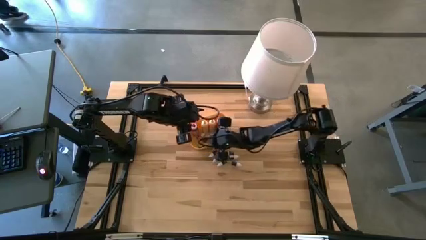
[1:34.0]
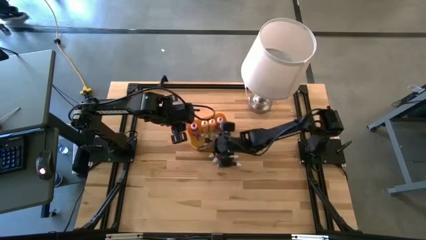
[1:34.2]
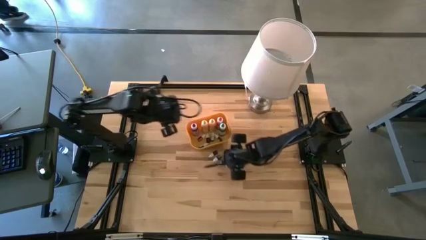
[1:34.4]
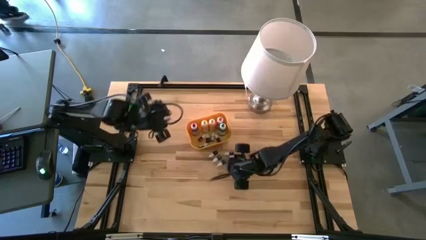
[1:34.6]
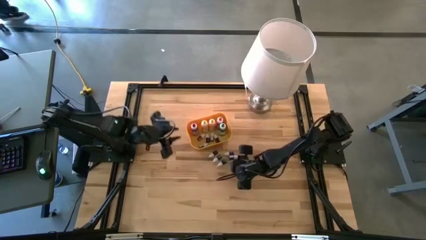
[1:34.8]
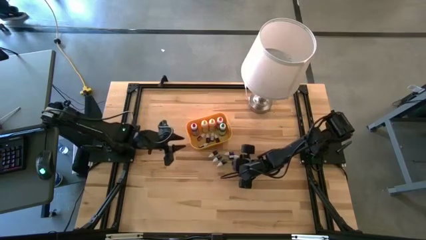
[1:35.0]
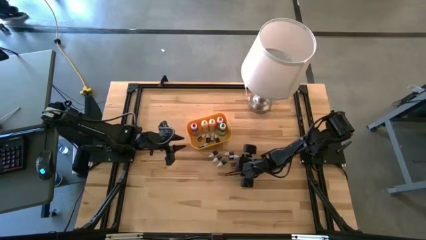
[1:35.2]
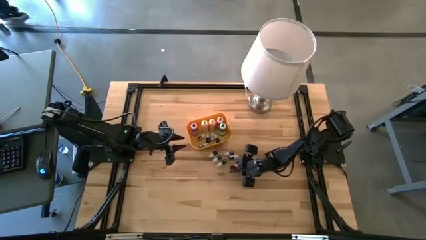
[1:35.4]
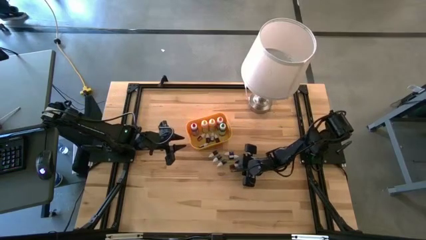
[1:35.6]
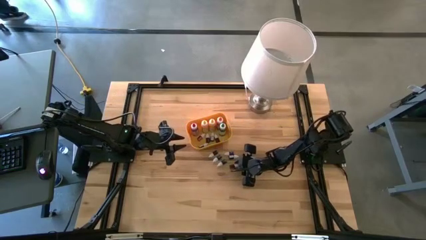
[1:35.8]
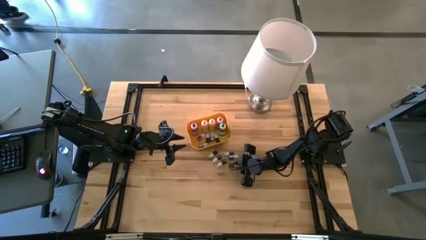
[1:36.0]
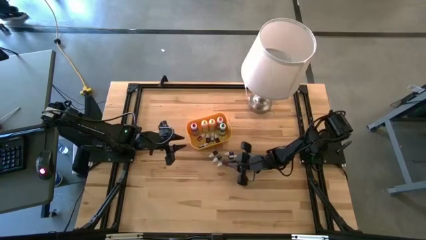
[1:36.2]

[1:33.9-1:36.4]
Task: Pick & Place food coloring
Put the small red food coloring bottle into the yellow bin

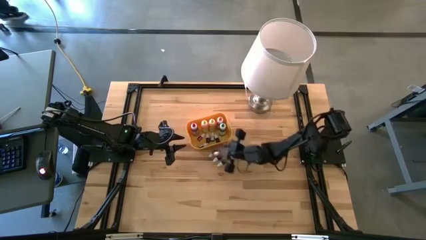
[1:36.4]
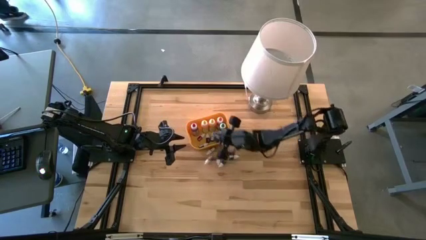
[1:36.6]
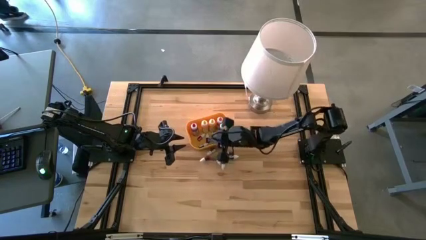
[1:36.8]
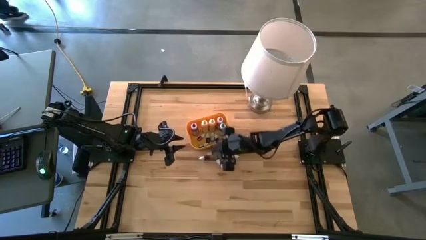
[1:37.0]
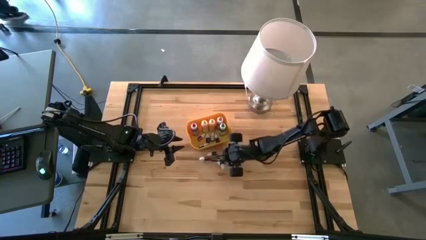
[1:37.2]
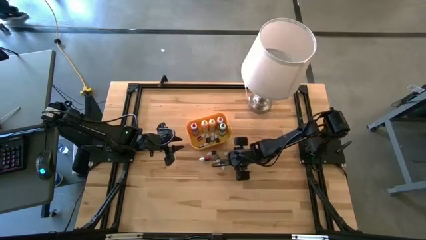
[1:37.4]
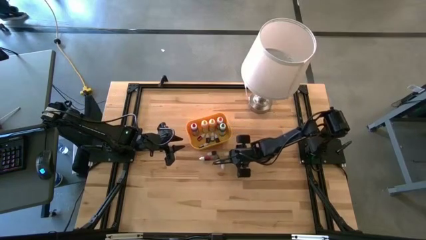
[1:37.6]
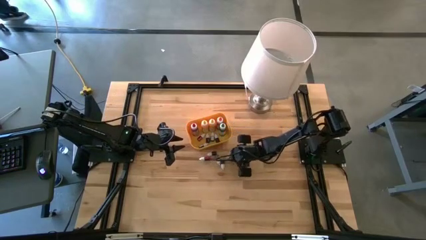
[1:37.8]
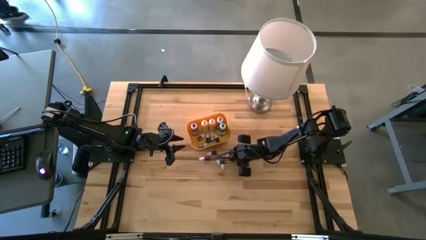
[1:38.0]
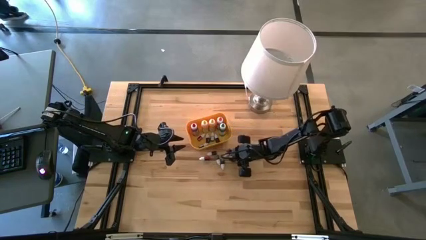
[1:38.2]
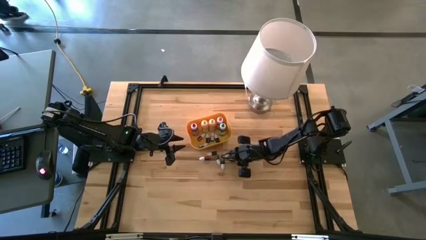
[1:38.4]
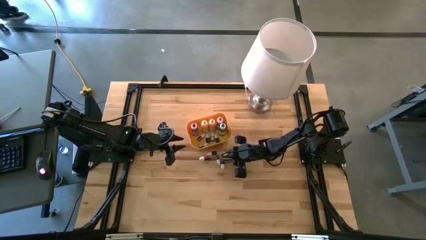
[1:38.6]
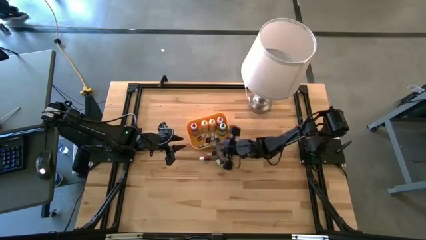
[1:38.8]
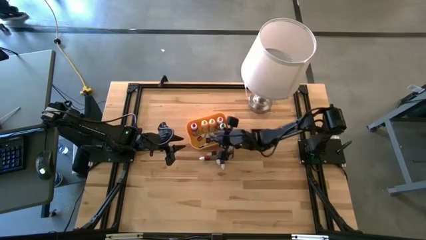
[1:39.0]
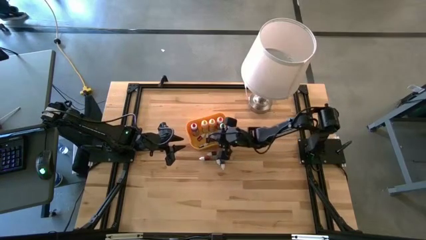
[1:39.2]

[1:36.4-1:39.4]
Put the small black food coloring bottle into the yellow bin

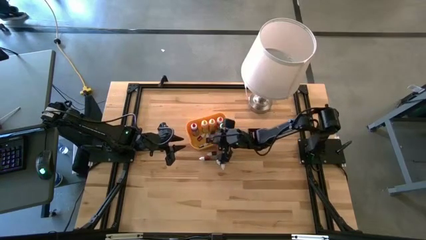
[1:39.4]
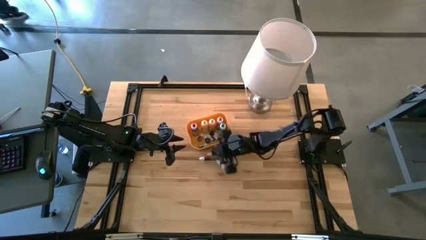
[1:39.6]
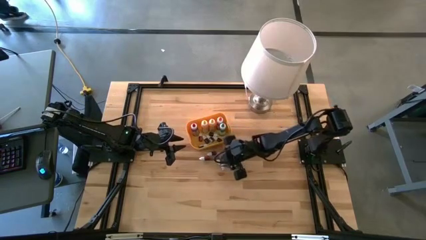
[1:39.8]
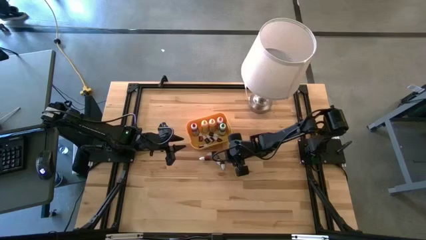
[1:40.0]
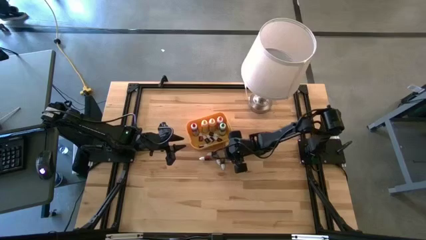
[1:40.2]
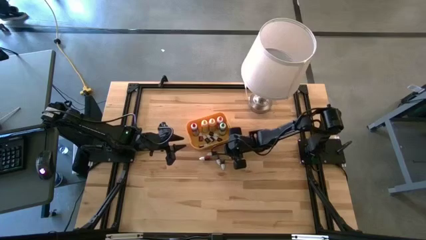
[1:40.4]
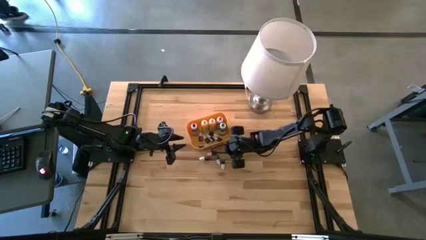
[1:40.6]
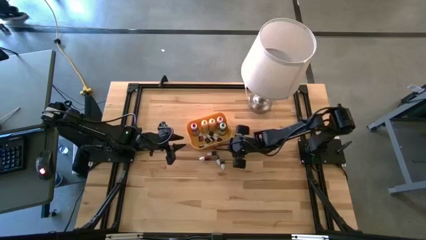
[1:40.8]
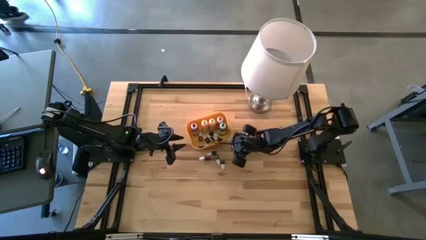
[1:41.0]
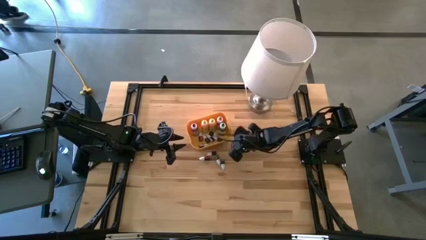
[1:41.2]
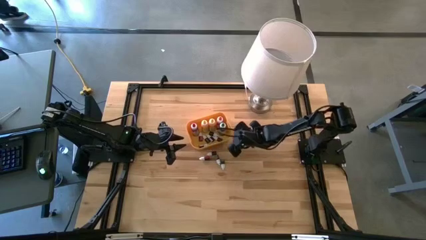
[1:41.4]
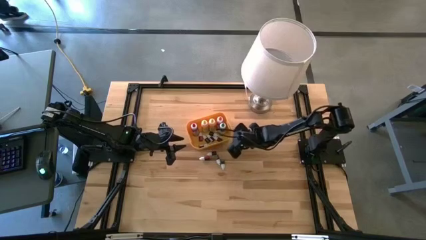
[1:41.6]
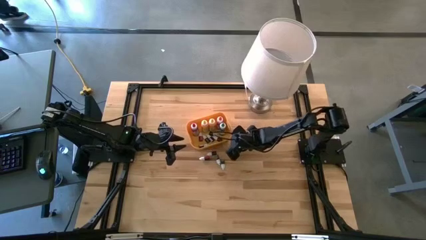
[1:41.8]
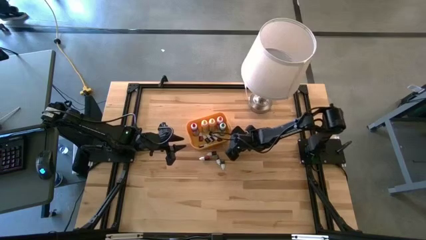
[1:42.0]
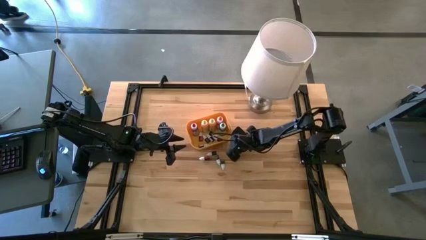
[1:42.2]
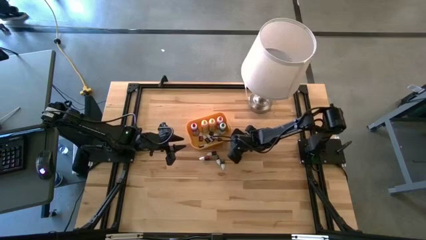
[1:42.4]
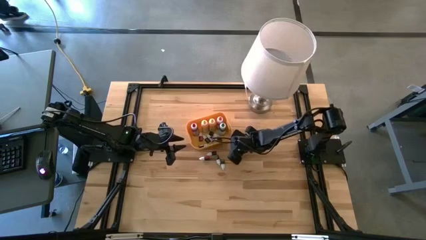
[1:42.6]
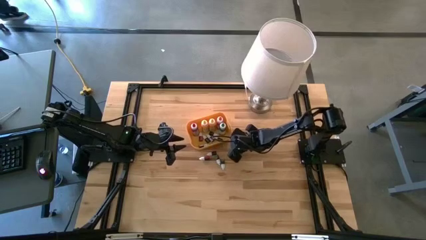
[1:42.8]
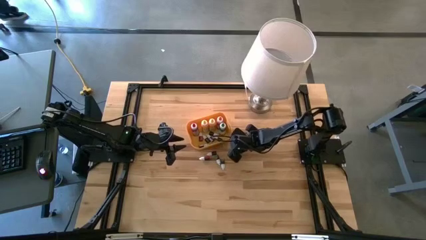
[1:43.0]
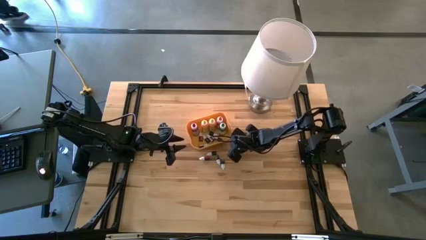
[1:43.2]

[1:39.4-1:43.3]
Put the small black food coloring bottle into the yellow bin

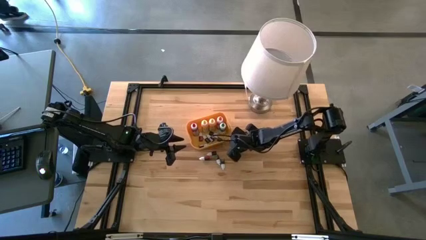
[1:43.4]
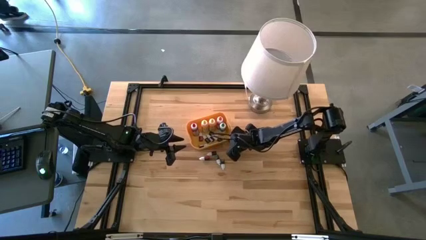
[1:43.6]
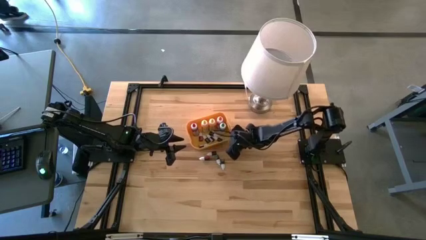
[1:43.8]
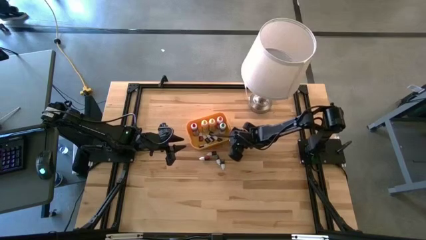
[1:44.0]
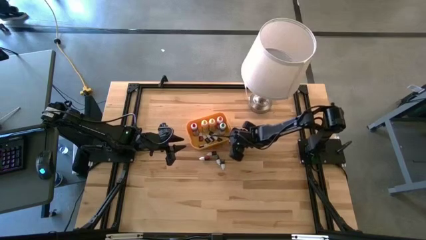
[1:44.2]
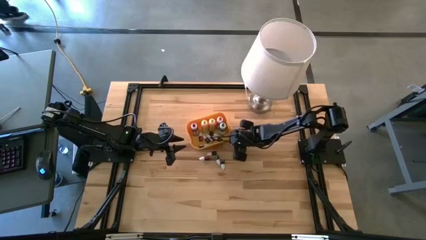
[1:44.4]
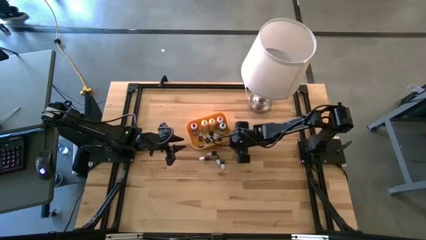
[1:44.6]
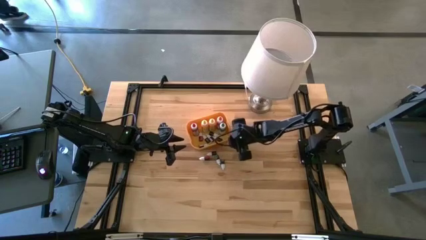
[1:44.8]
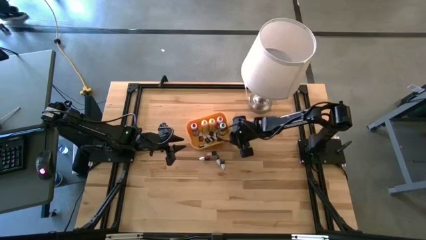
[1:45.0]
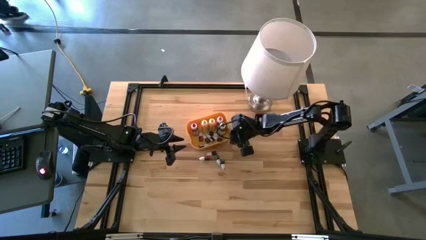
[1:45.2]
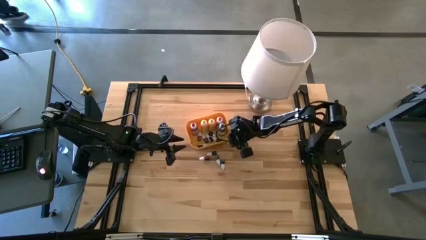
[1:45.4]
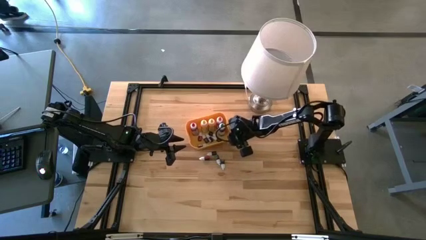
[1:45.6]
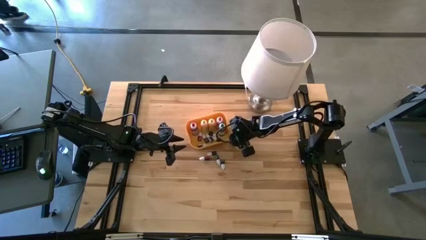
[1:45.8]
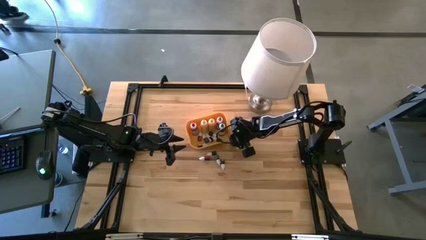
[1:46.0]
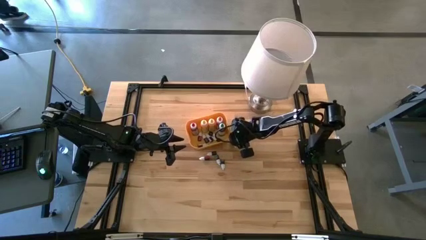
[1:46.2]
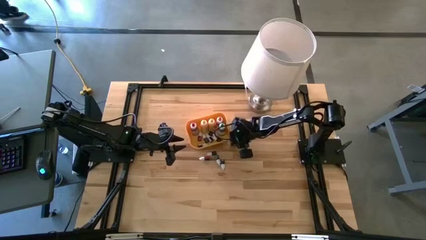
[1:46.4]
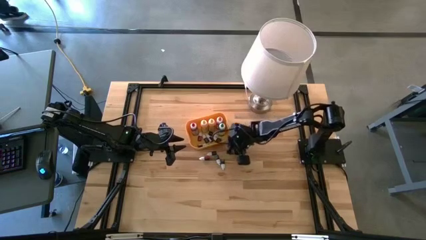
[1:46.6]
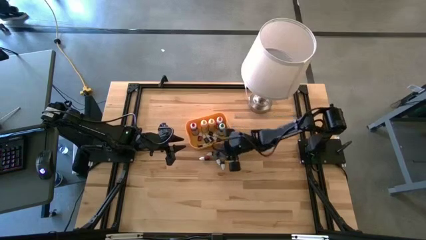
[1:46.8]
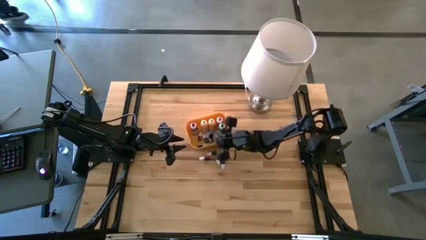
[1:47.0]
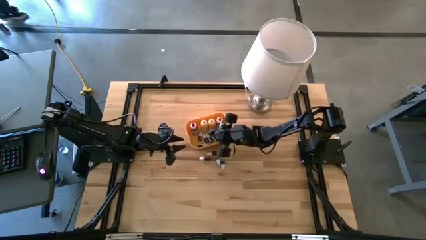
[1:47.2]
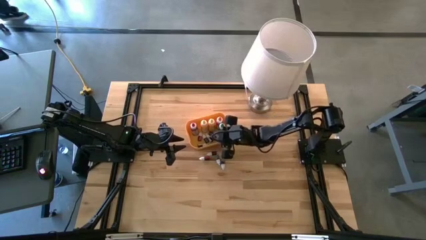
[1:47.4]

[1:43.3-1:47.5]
Put the small black food coloring bottle into the yellow bin

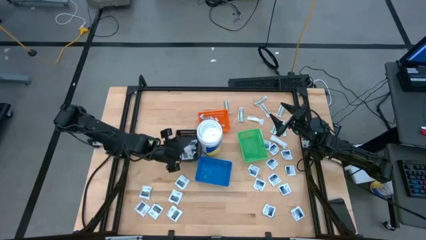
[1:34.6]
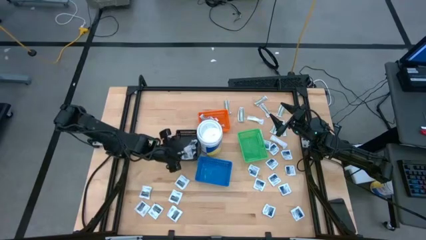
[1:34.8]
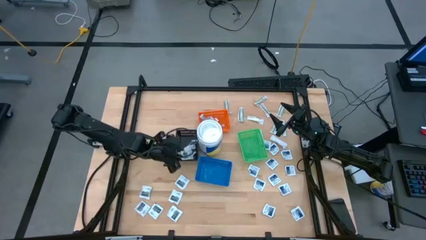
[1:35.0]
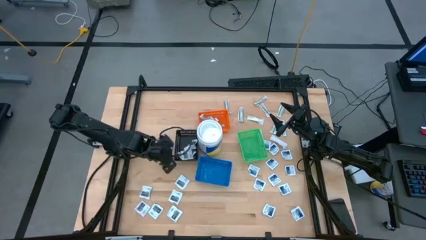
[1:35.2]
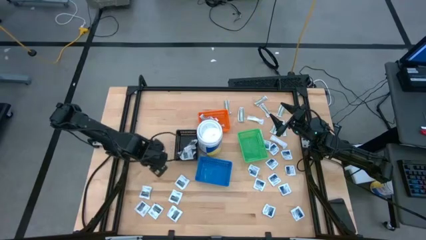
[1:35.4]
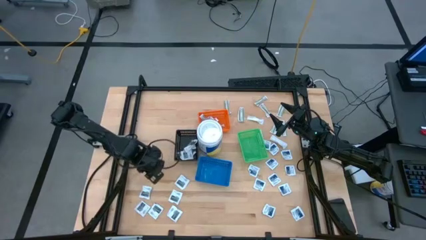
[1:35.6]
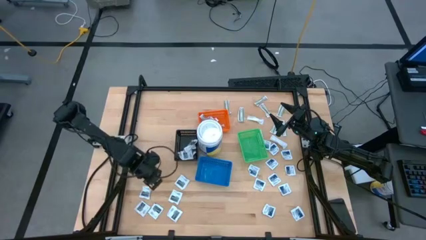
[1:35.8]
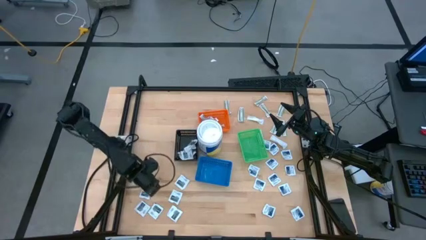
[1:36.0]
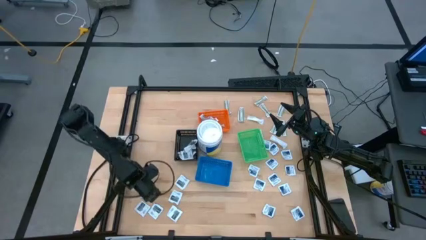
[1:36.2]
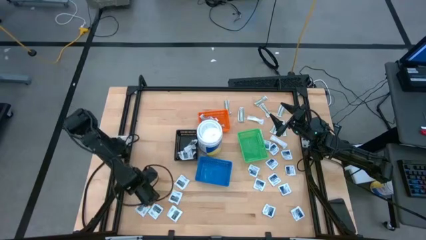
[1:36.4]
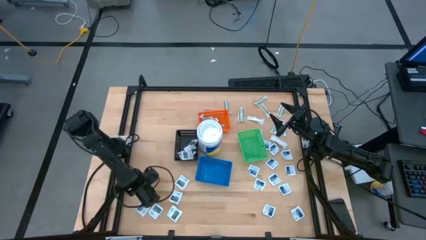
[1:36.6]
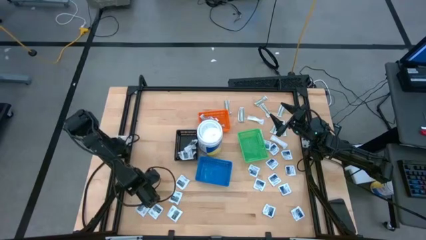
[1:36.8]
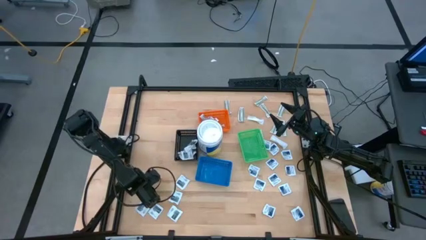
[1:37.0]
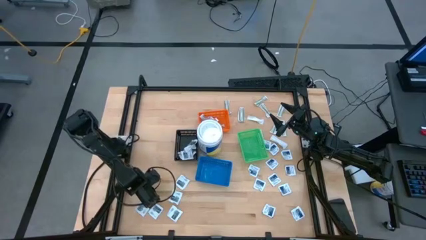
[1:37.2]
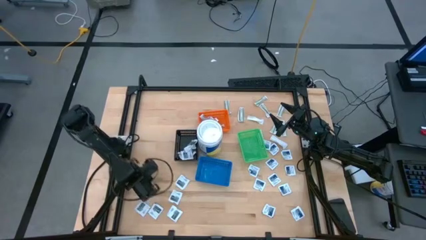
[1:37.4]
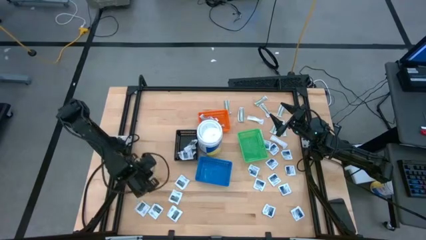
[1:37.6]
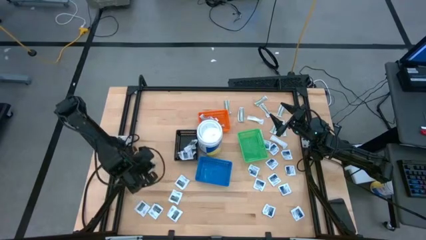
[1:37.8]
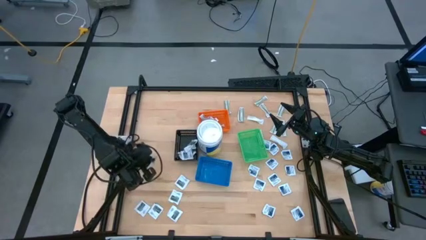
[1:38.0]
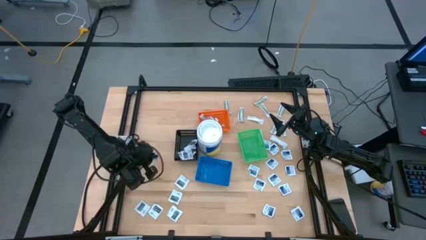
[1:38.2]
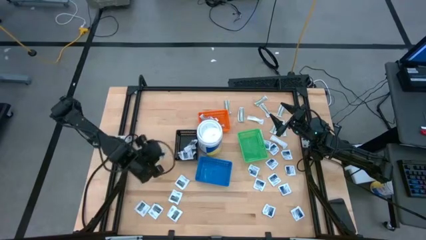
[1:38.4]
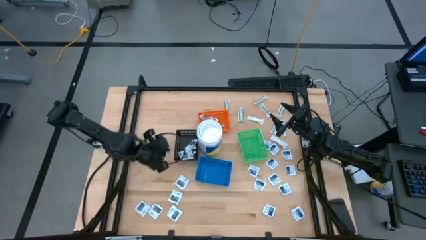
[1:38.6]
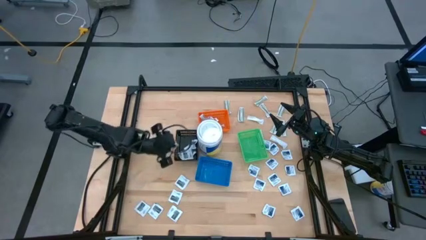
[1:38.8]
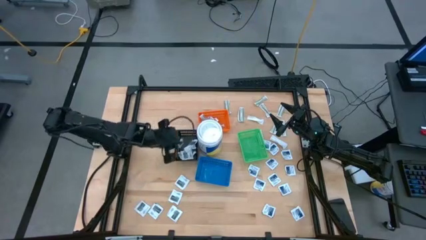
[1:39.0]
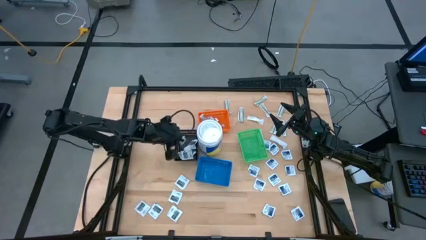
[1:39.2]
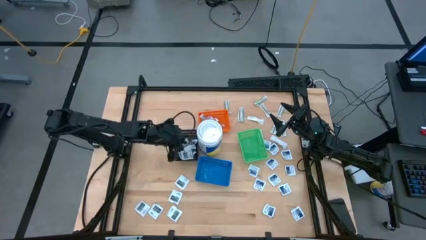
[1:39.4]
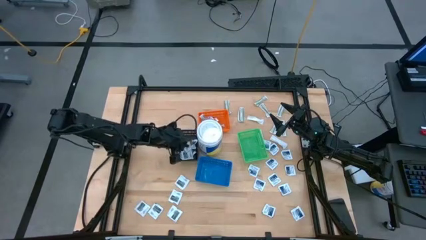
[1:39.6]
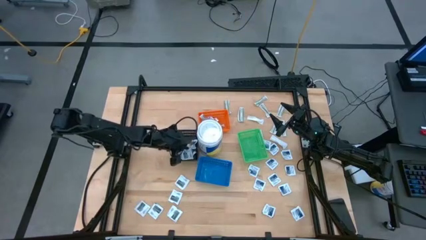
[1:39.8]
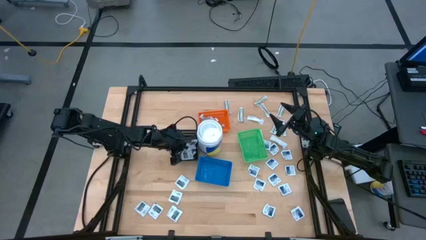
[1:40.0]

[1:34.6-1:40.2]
Task: Pick & Place First Aid Supplies
Put the gray towelette pack into the black bin
